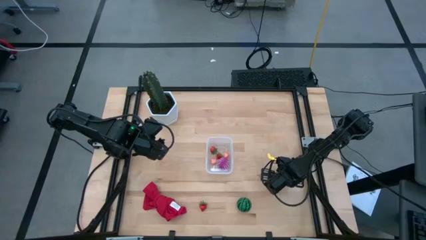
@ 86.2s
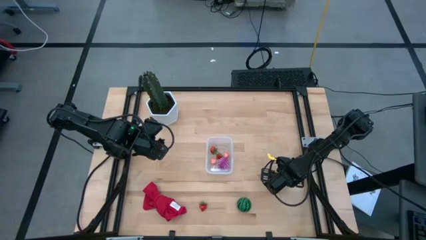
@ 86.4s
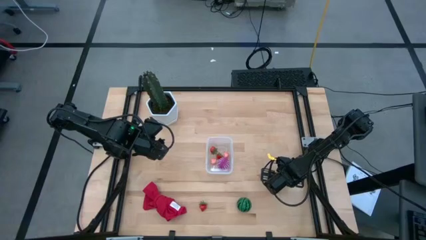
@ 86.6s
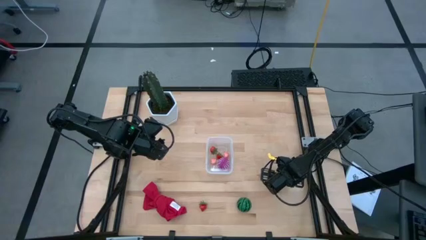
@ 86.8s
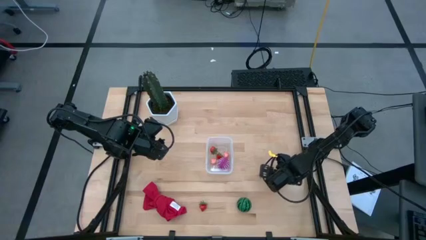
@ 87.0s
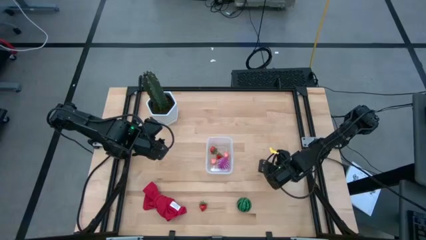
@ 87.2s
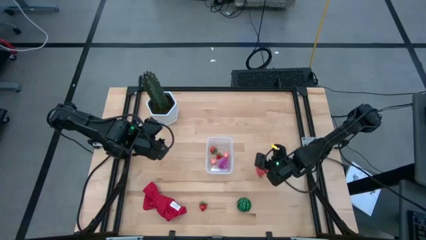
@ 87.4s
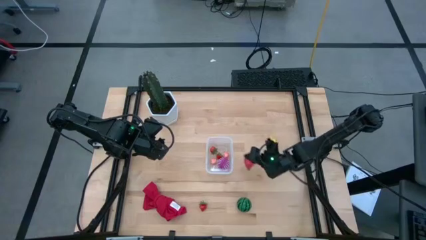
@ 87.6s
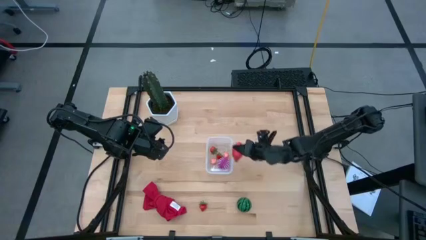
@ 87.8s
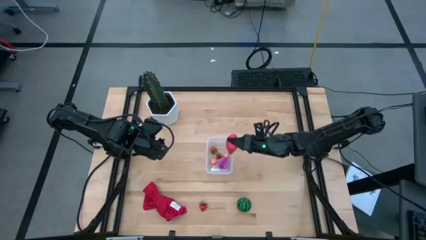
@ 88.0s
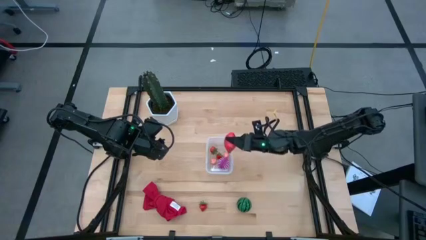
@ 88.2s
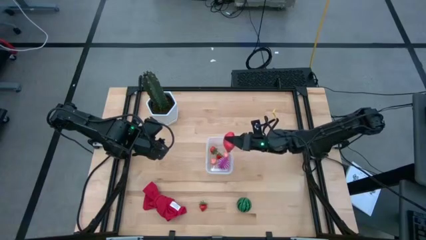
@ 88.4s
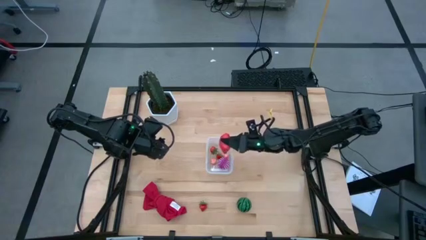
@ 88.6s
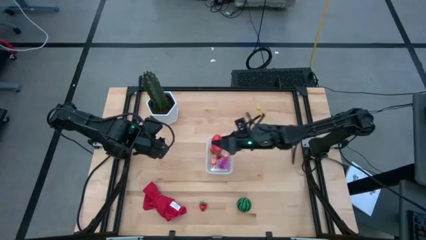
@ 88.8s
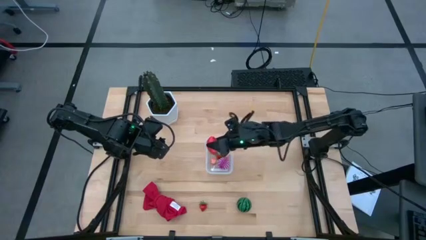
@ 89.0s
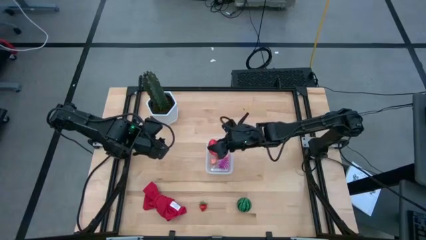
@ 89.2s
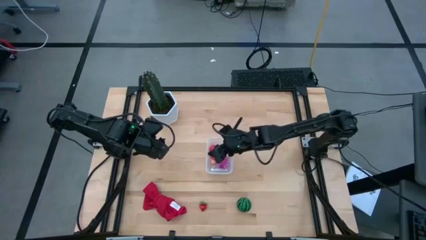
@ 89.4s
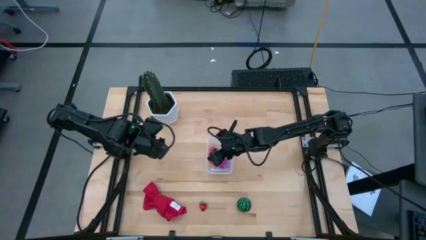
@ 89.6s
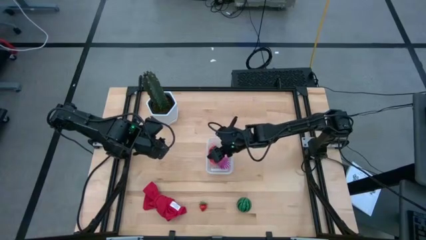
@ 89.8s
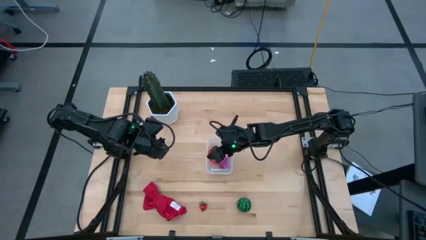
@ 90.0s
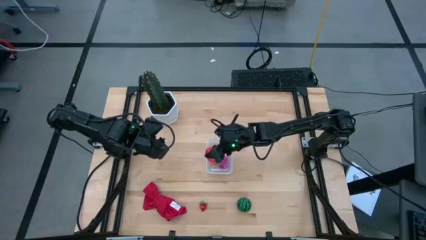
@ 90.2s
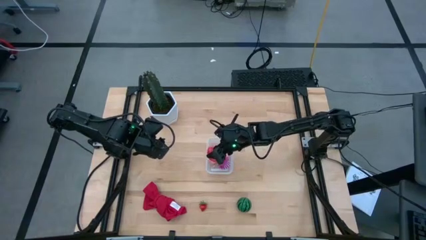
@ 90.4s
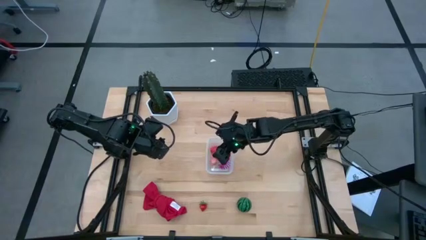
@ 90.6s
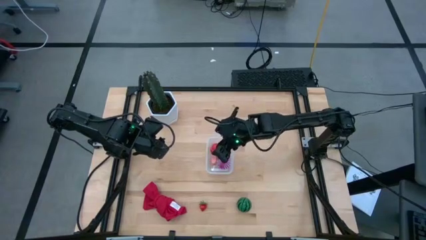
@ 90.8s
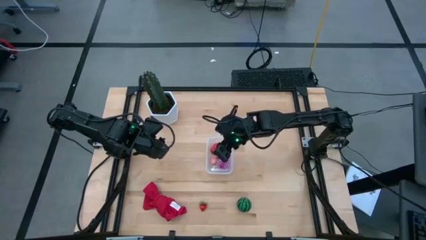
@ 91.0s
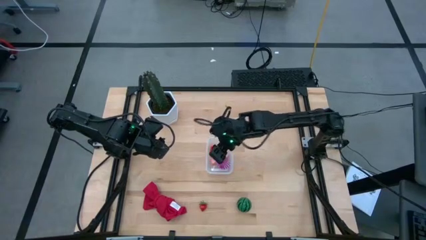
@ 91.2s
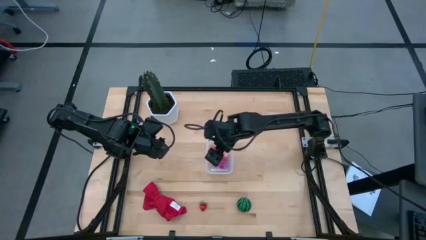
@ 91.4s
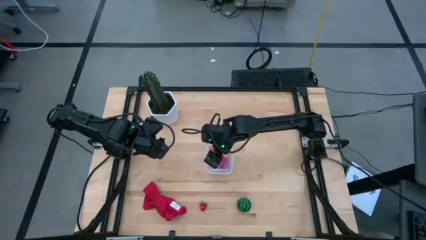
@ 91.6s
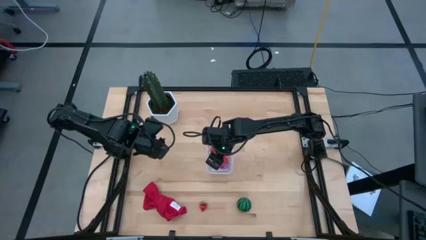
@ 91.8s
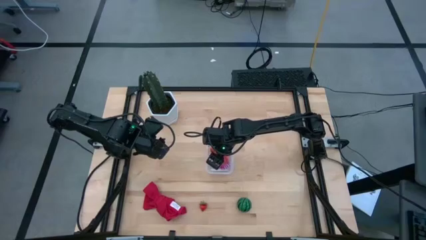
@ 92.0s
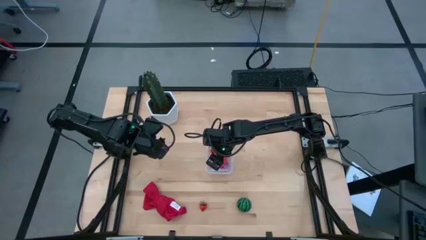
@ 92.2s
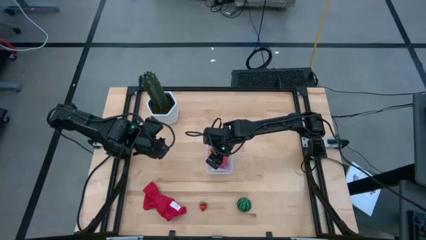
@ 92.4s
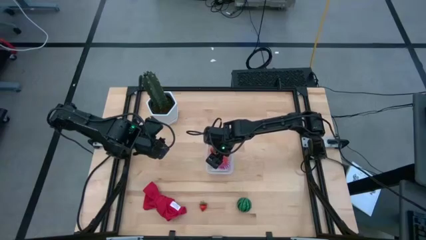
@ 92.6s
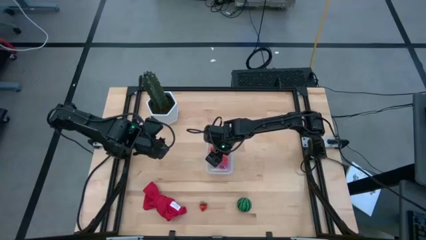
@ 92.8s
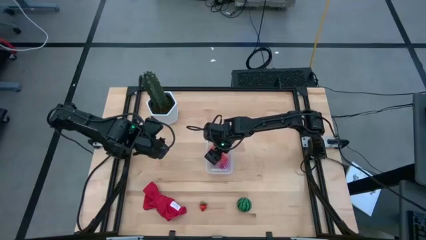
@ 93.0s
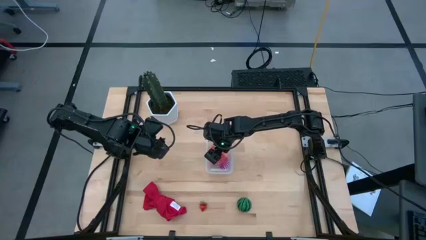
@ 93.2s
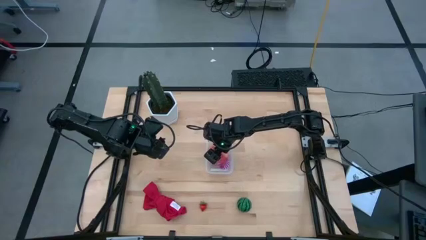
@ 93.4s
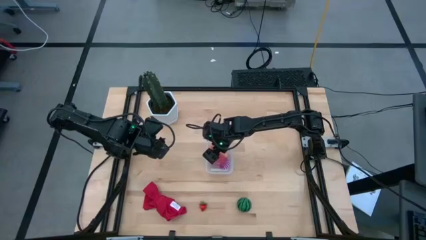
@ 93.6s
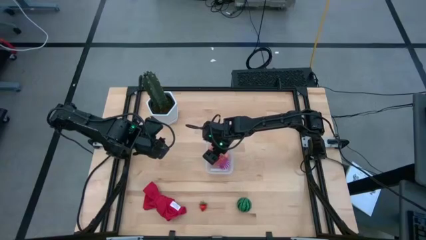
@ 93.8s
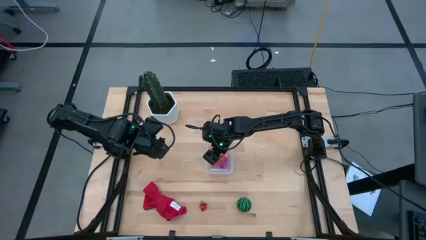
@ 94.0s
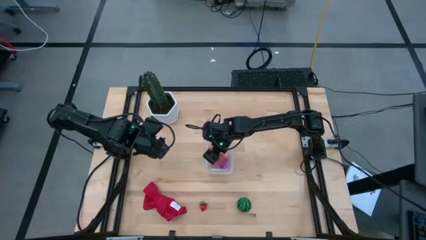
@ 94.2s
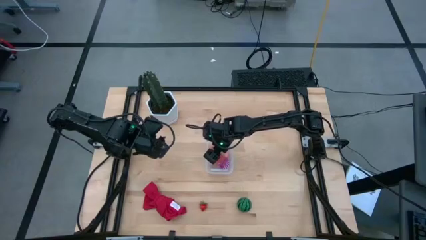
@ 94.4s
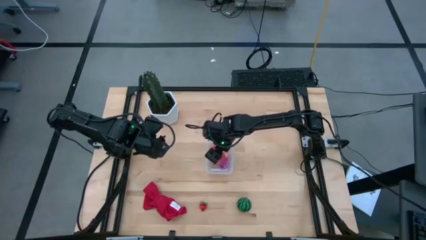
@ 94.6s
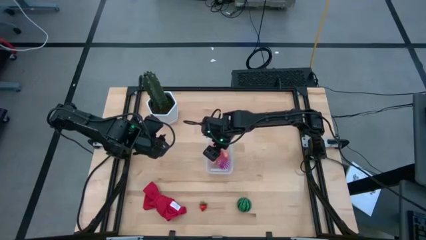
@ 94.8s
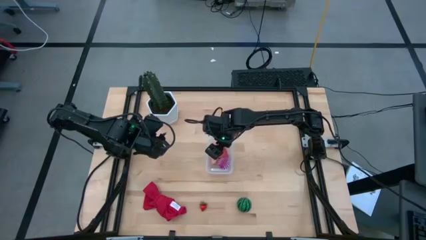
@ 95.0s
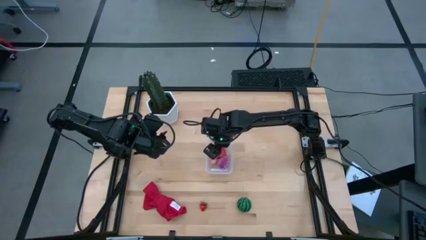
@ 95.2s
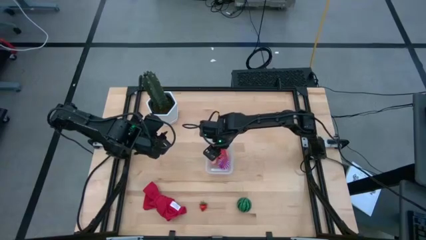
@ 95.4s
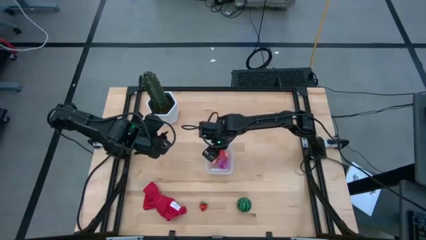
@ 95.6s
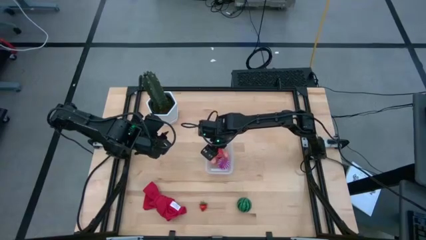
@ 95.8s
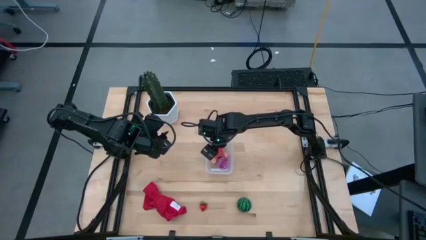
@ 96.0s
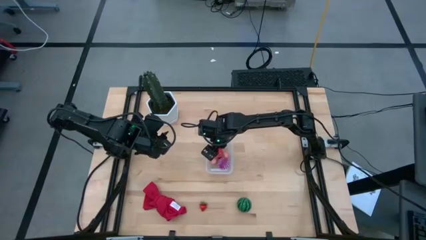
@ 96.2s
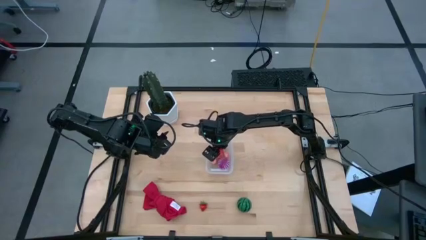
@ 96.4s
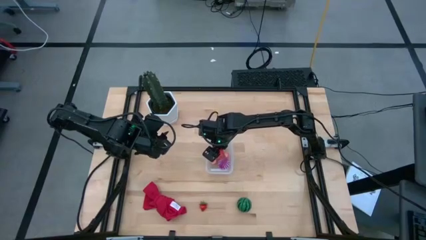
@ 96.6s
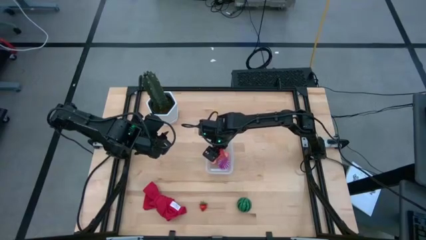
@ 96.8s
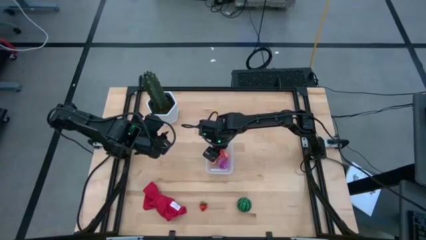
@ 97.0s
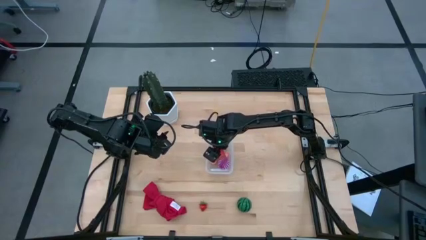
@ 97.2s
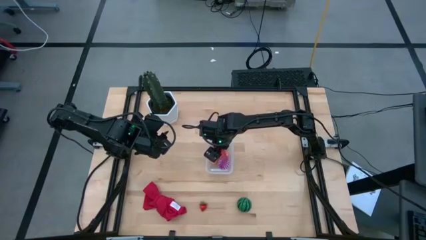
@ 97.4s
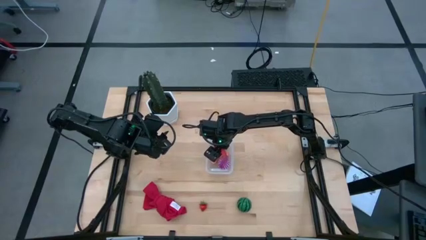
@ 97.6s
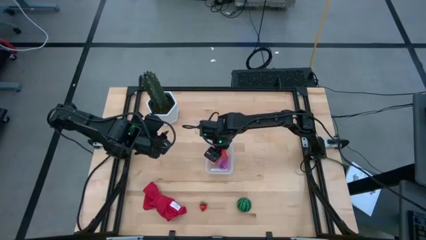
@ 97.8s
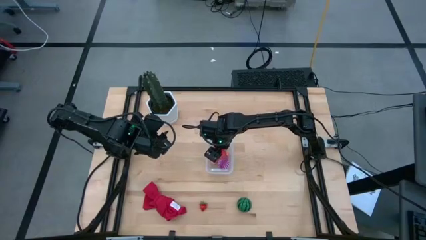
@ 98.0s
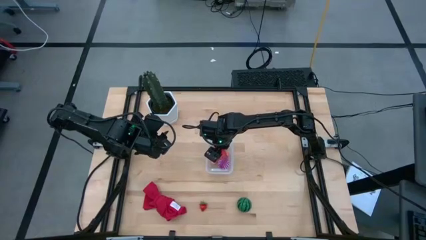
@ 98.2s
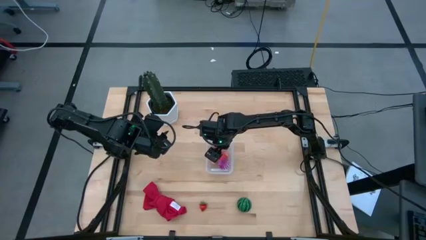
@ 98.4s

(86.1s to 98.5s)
Task: Pick and placing Produce into tupperware
Put the red dragonfruit into the transparent bin

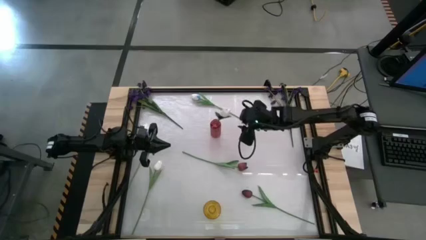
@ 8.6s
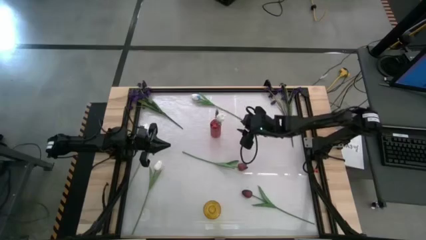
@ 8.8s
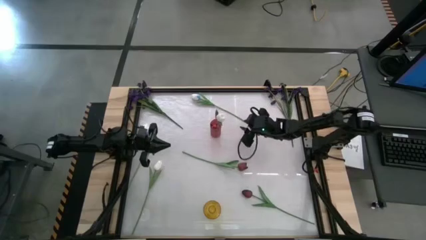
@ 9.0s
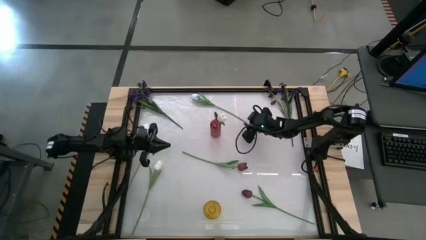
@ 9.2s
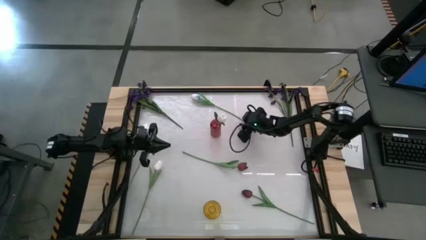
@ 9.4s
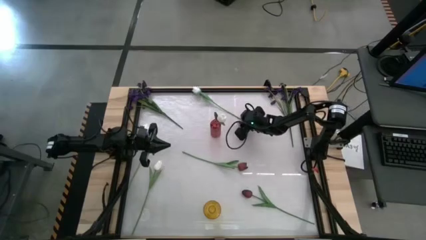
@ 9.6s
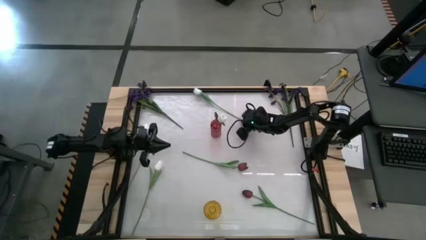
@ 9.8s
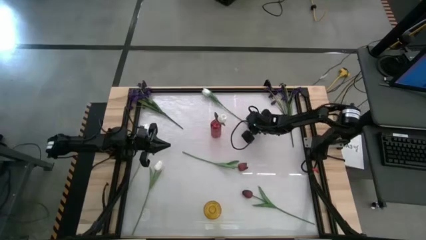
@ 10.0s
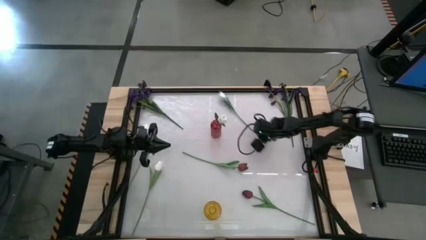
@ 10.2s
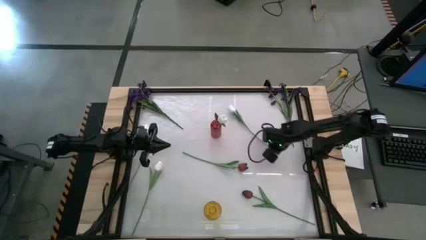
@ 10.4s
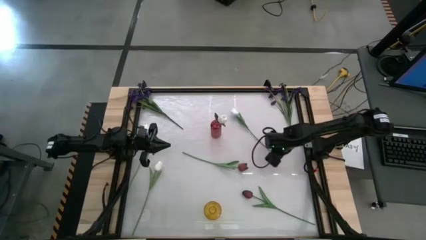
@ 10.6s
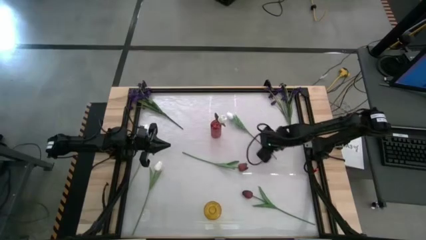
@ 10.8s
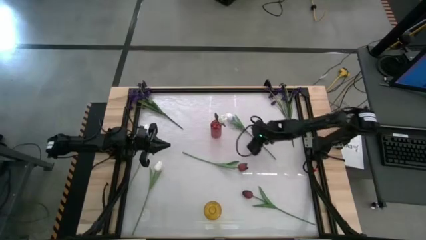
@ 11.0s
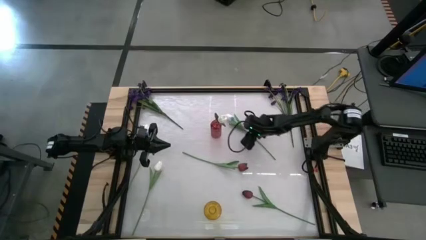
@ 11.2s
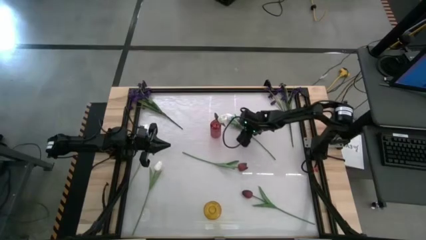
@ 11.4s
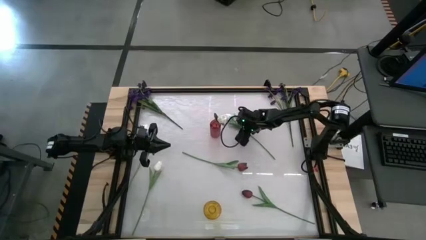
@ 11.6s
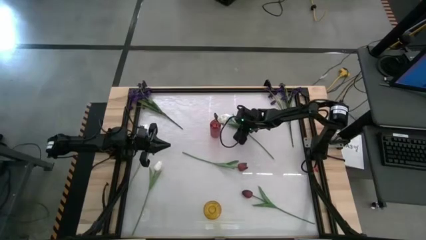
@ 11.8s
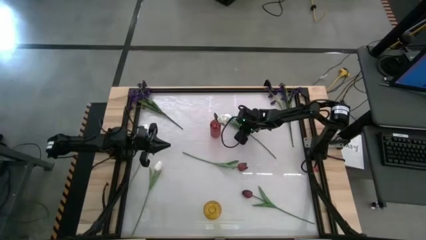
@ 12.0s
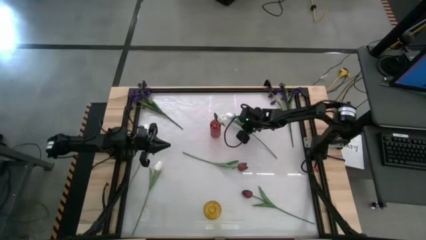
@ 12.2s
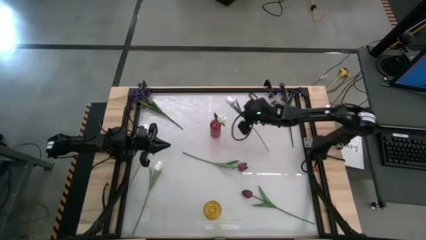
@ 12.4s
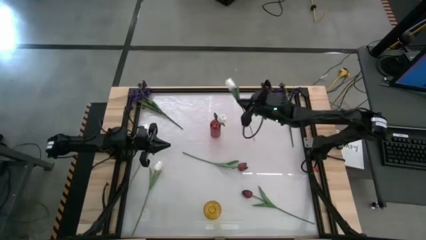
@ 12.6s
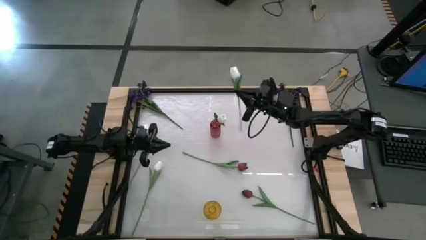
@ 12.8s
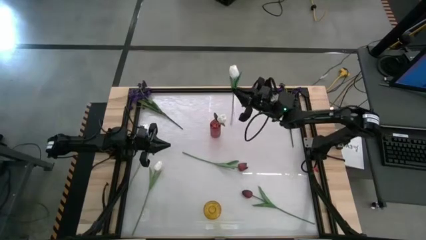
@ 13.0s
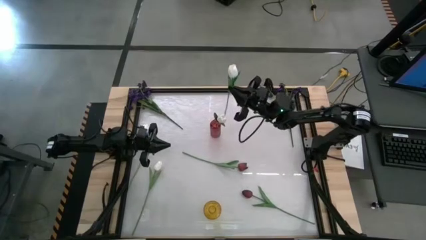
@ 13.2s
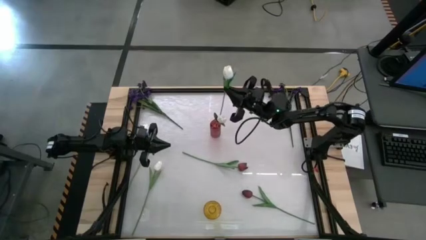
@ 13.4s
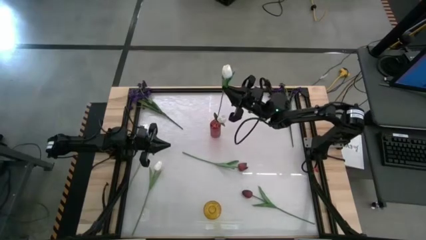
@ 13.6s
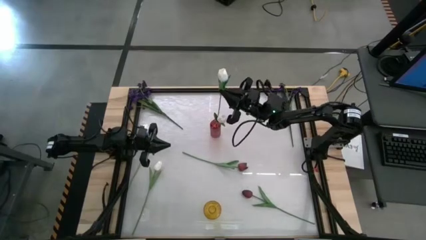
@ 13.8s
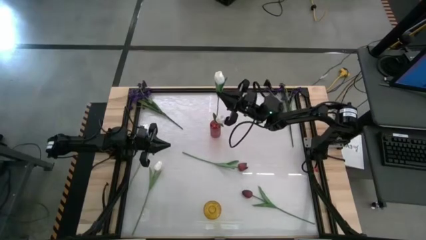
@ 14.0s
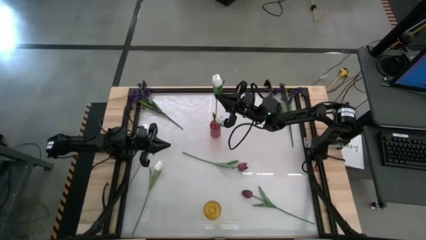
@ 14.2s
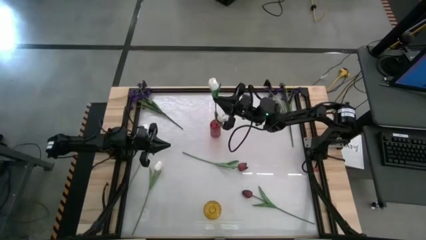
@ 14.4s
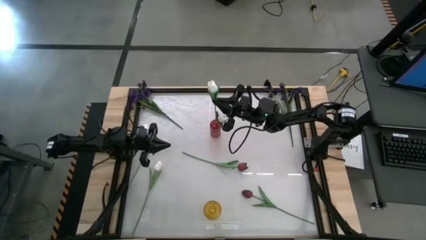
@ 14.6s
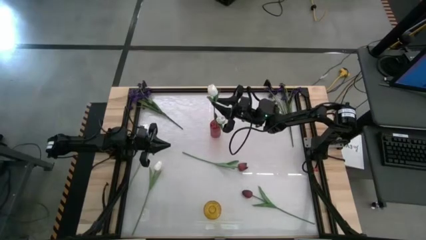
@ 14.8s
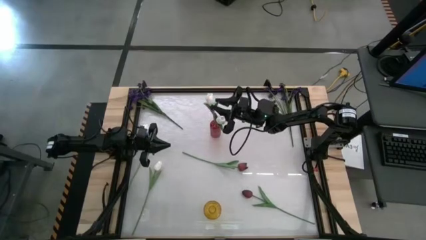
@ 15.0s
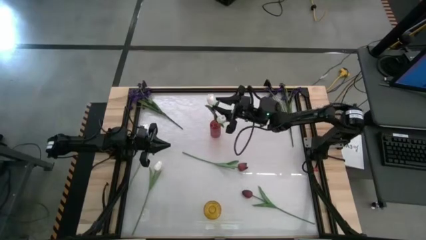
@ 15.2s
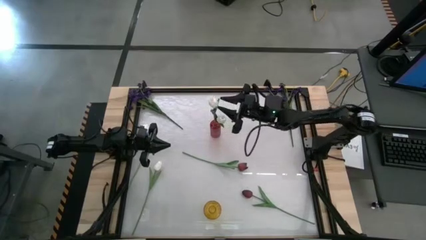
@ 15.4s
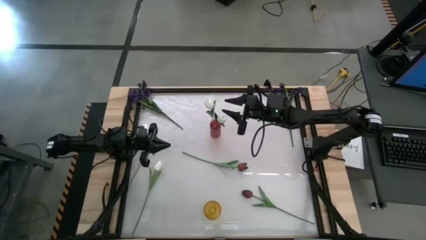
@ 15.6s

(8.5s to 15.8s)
Task: Sort flowers into vase by color
Put the top center white tulip into the red vase
